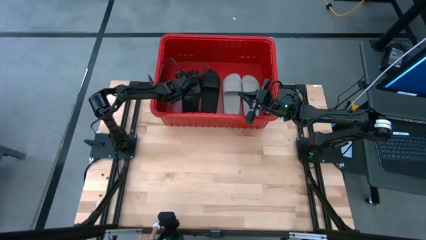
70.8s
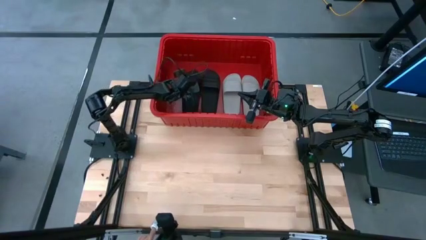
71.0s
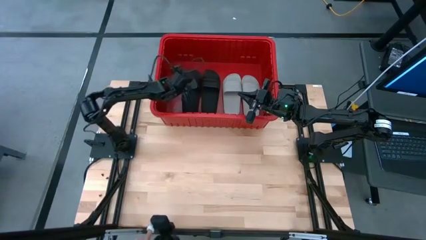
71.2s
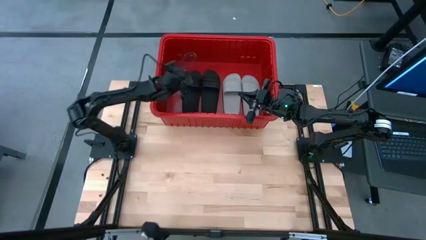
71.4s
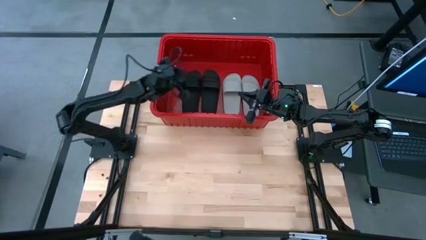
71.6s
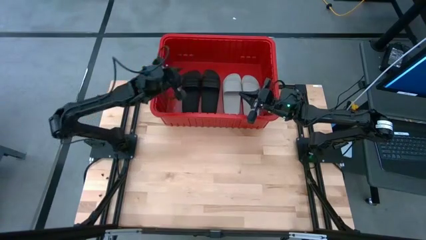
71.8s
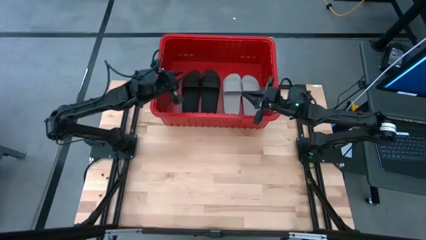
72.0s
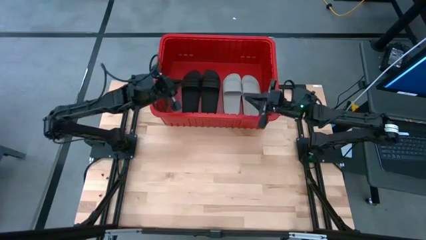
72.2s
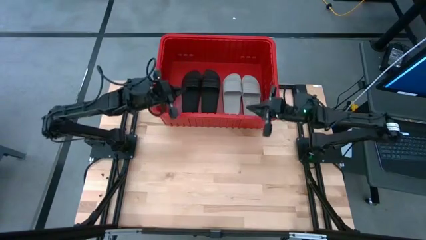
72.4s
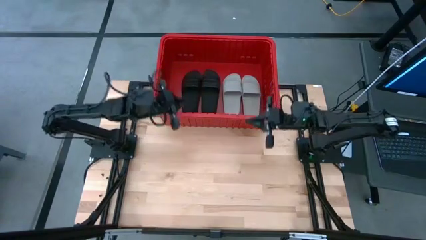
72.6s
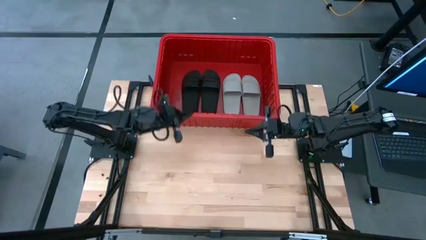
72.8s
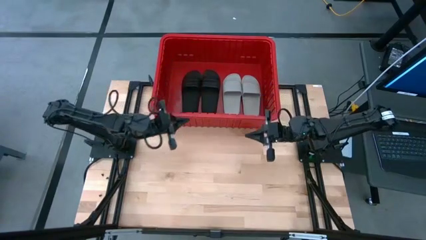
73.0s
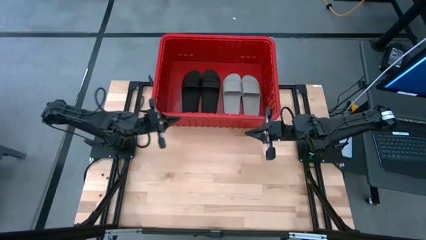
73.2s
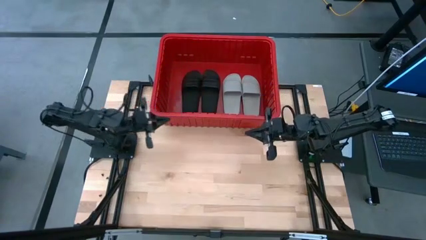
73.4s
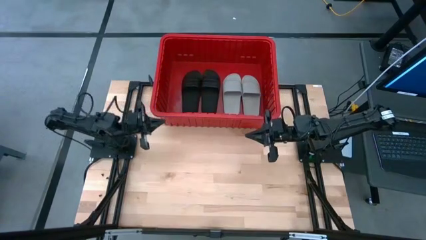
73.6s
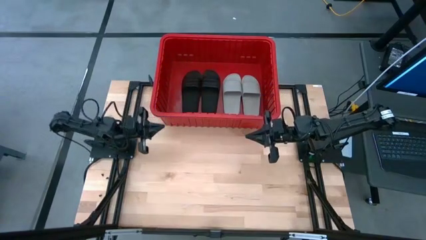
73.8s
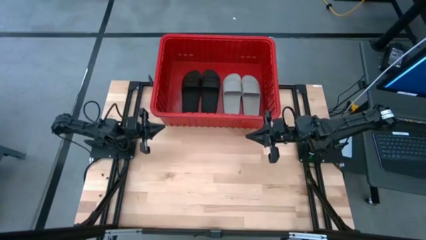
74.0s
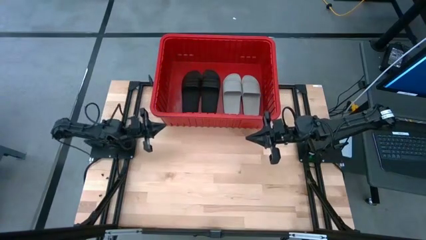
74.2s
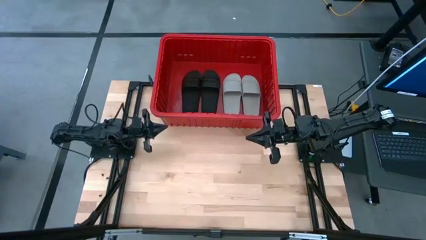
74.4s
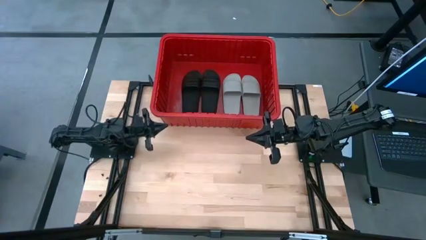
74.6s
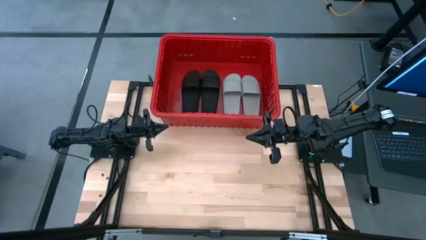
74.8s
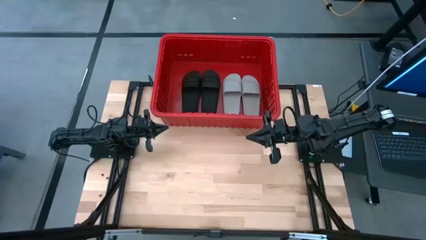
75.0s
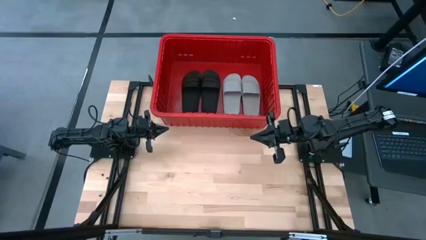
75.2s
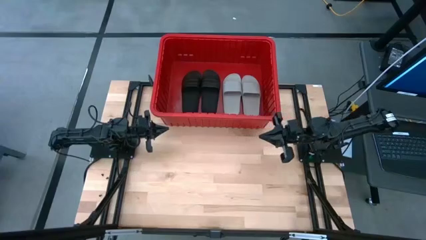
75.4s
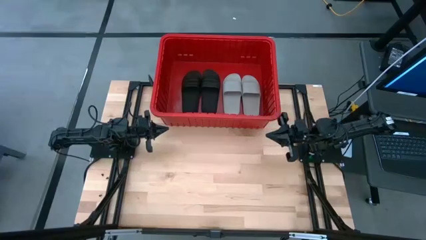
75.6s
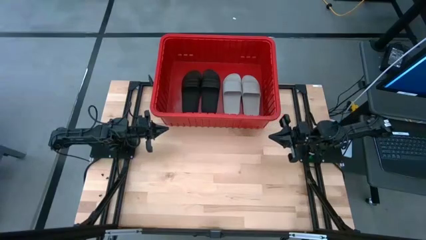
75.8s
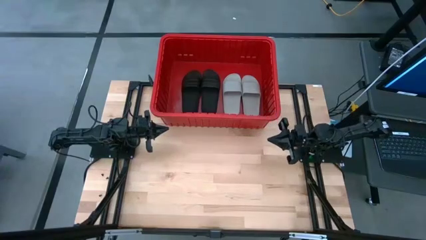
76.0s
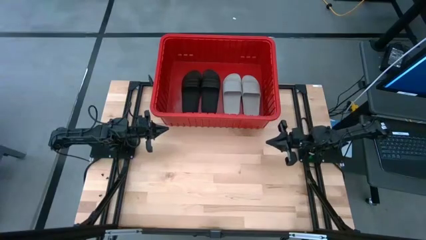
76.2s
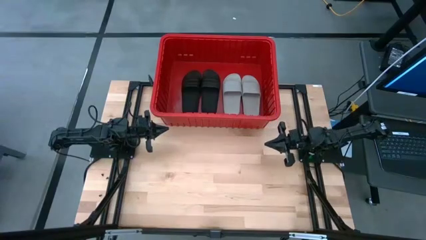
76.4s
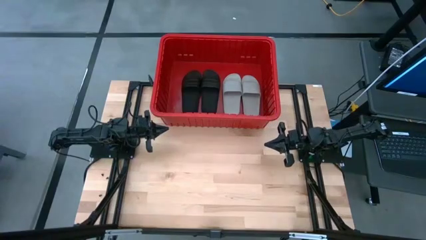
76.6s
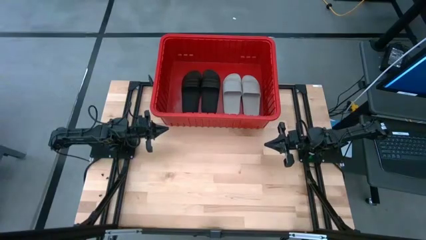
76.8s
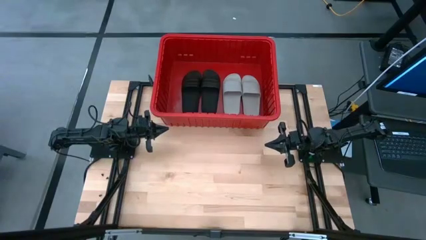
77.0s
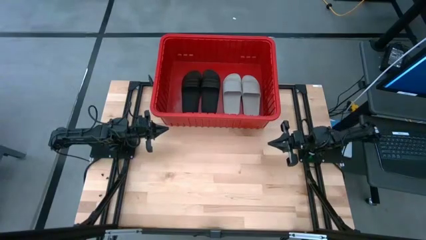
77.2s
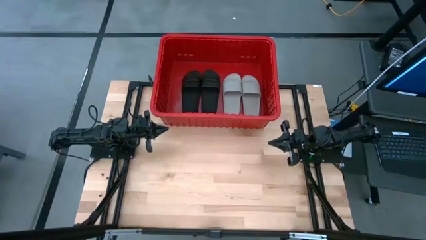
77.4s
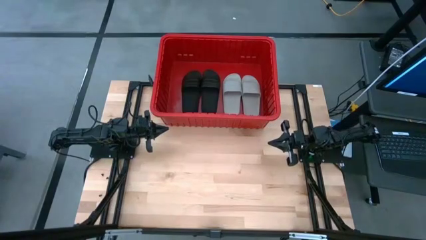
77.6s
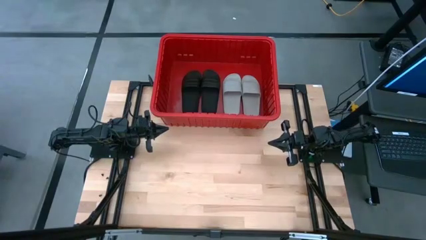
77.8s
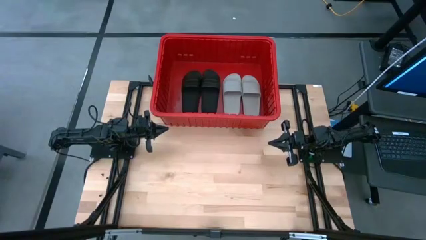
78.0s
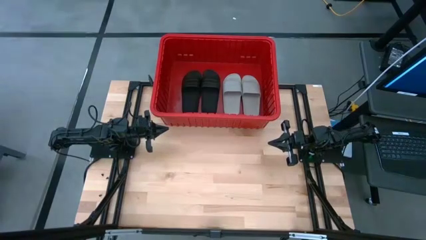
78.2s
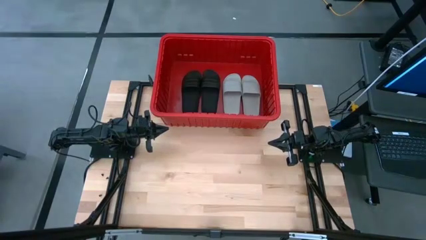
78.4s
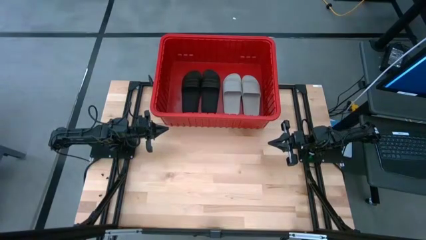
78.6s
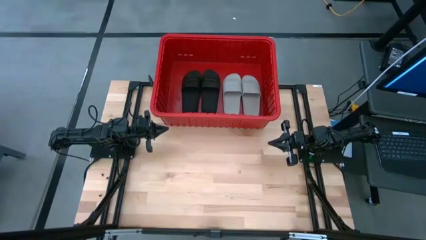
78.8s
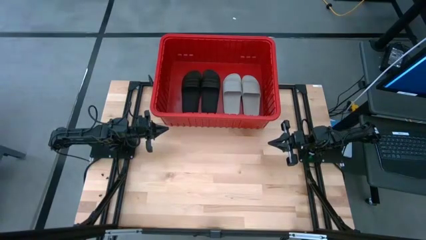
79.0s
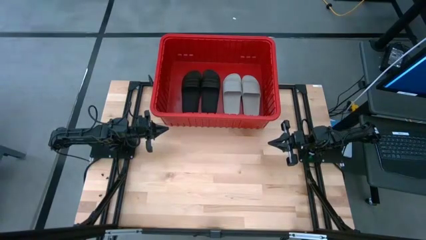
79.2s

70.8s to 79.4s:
Task: Pick and place slides into bin
Return to Home Position

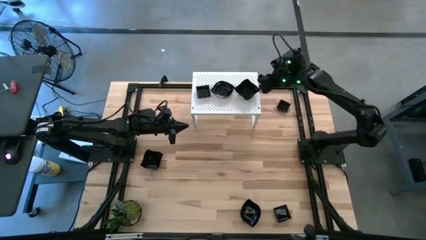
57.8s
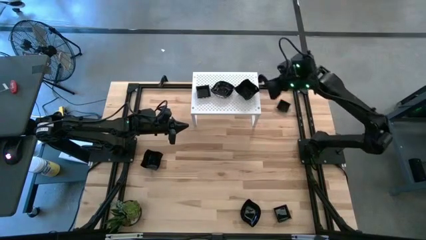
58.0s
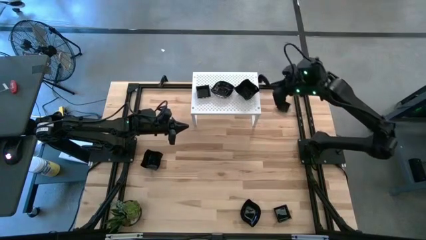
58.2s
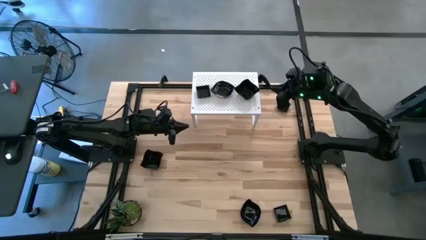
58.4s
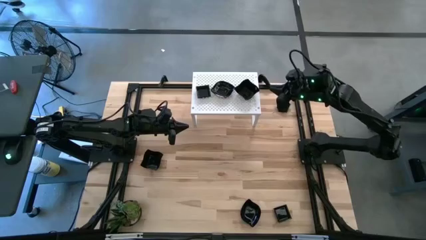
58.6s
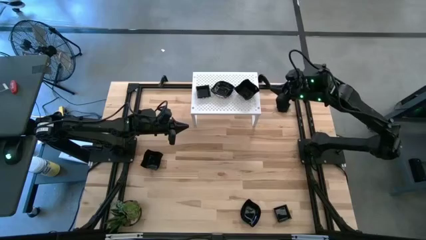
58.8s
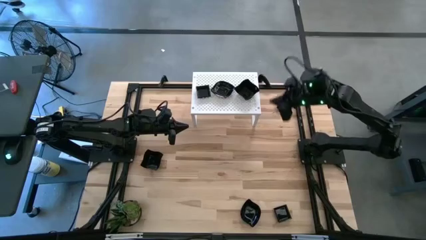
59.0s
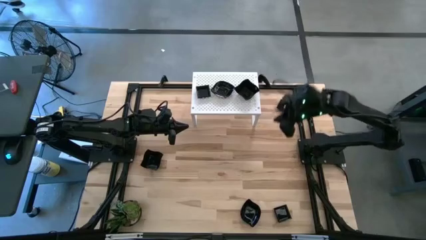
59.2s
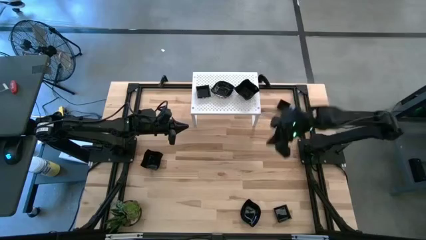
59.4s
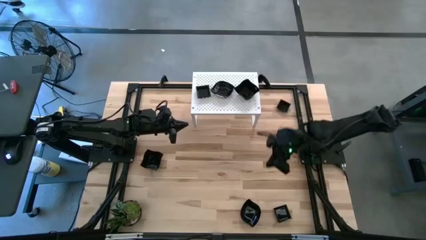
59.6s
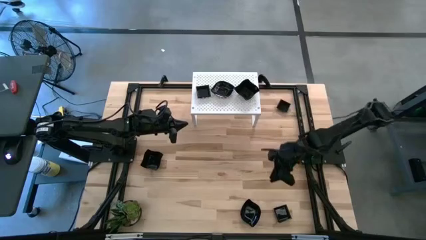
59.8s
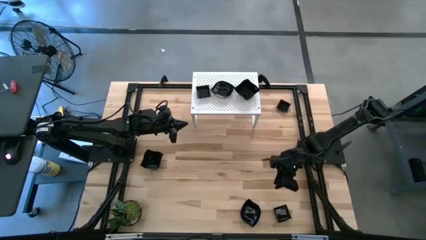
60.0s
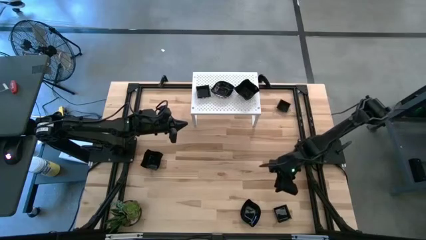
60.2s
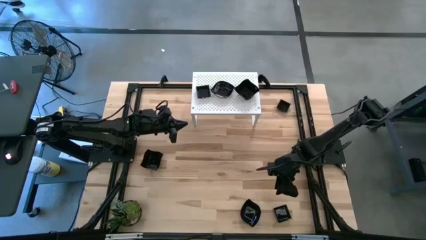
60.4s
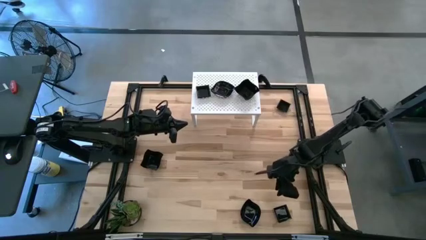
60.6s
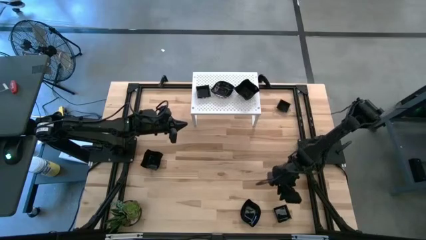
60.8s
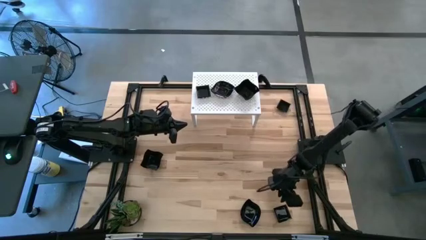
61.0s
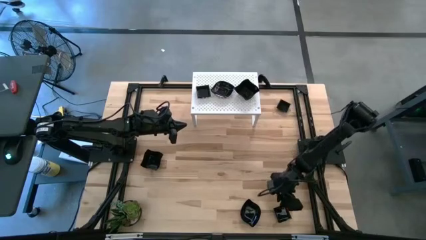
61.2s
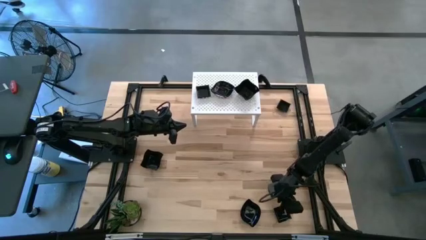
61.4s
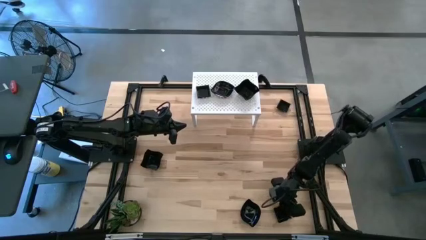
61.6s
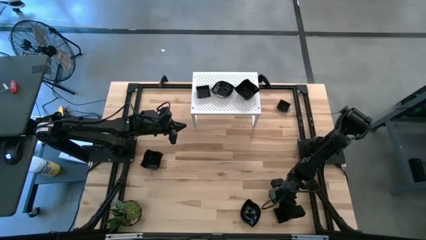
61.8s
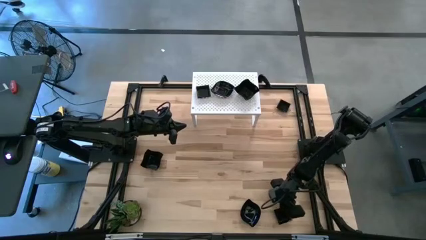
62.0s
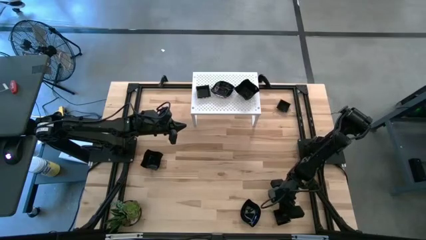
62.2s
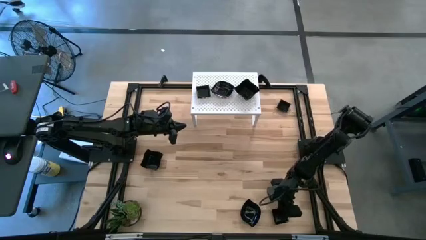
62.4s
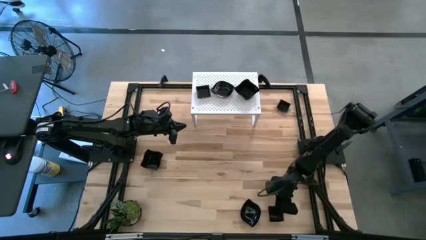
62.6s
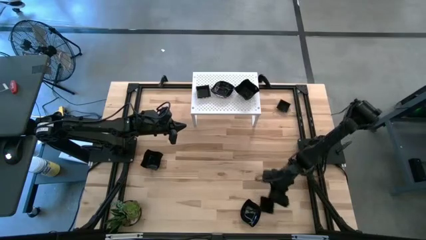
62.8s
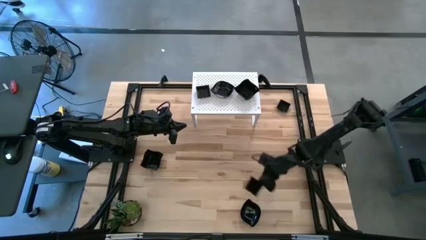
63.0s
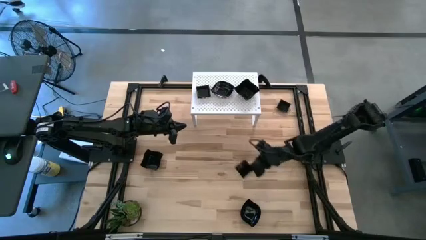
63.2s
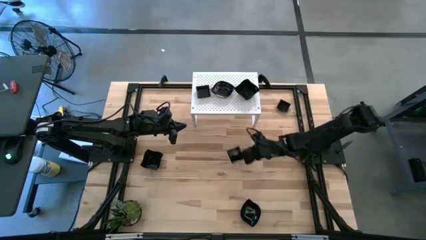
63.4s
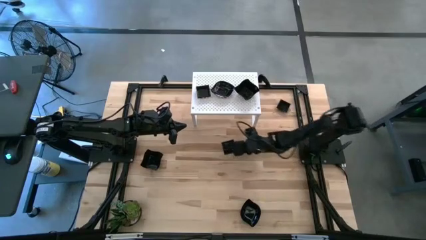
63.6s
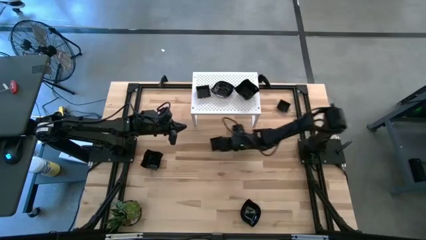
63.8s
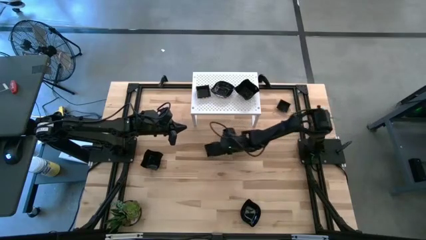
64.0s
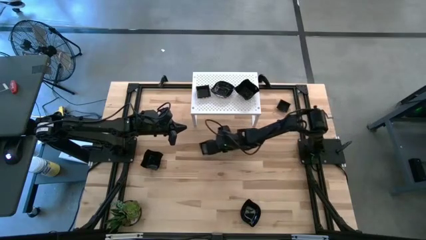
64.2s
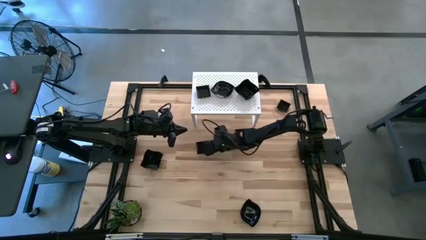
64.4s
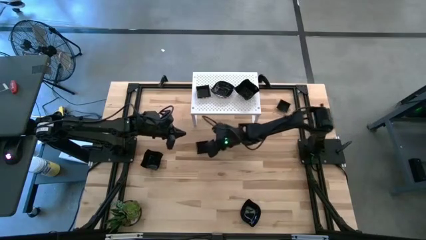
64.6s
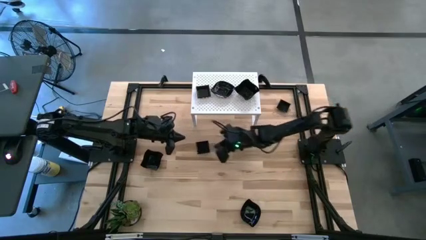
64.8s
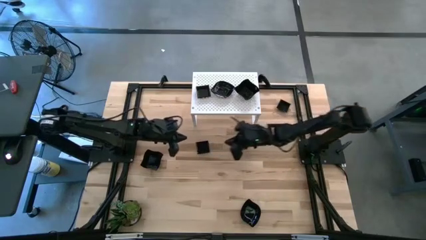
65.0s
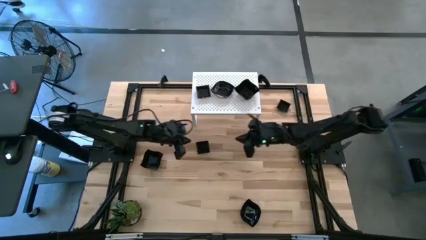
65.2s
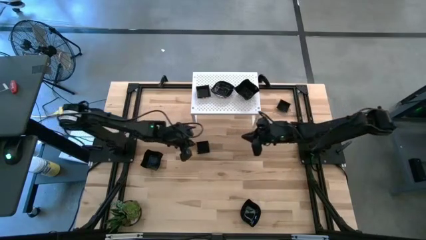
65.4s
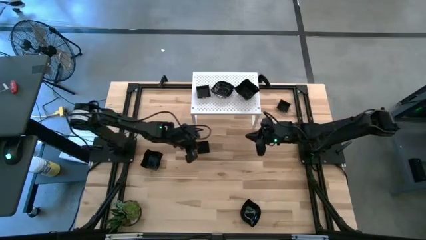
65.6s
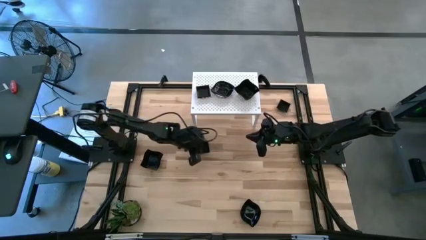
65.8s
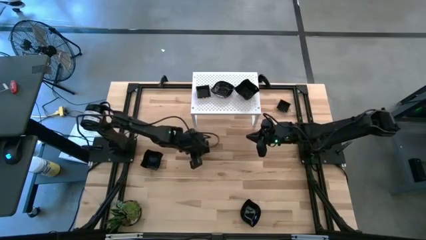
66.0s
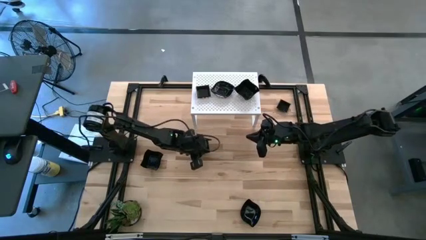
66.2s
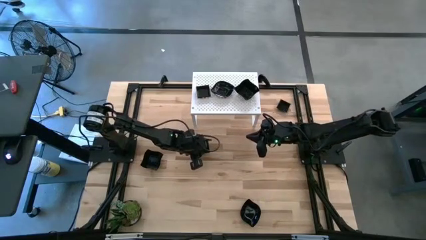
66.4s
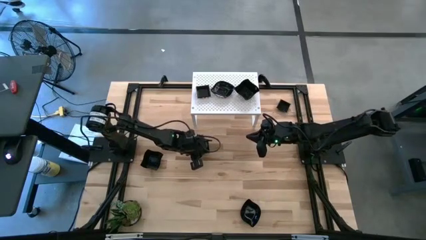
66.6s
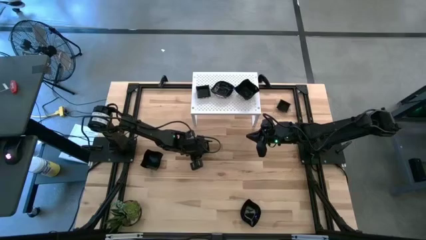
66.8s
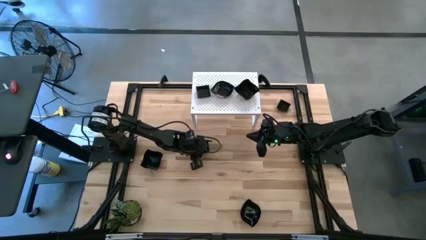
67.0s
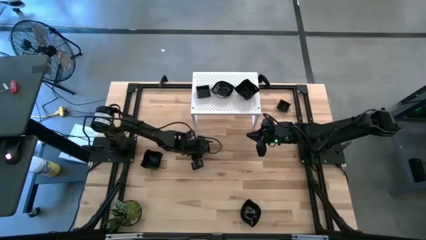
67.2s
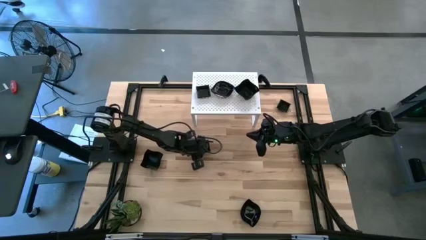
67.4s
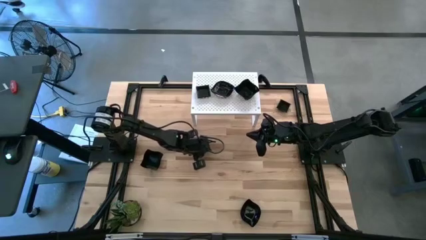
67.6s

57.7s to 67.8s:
Task: Pick & Place Mini shaped plates
Stack the black square plate on top of the black square plates on the shelf
